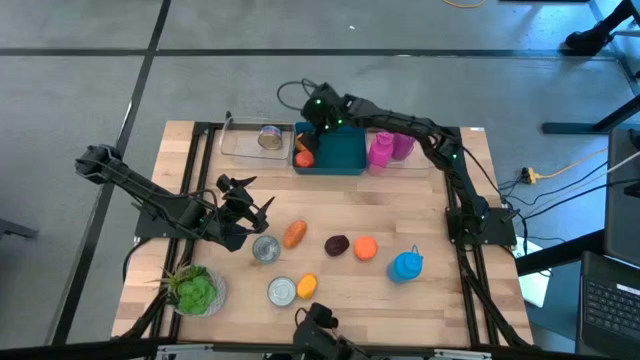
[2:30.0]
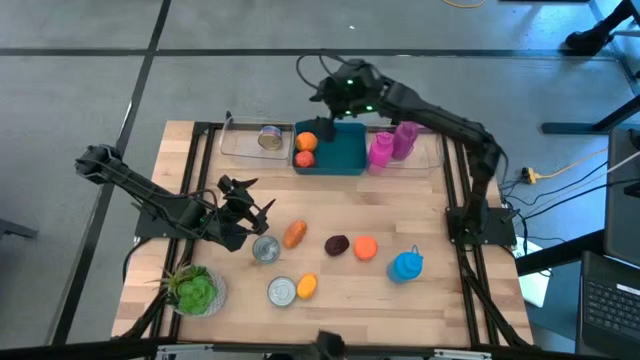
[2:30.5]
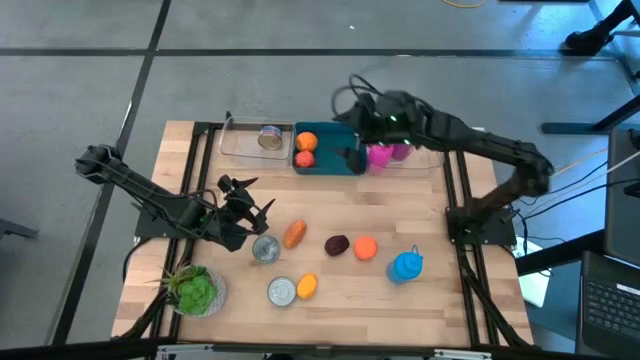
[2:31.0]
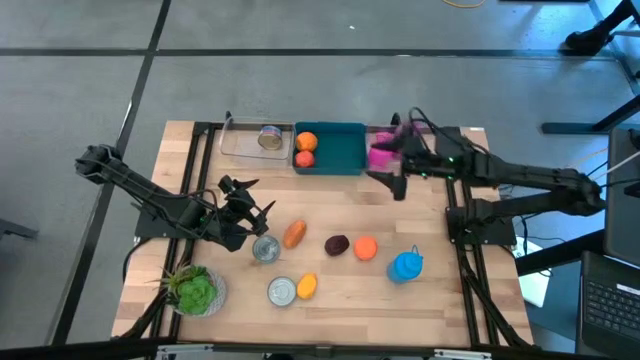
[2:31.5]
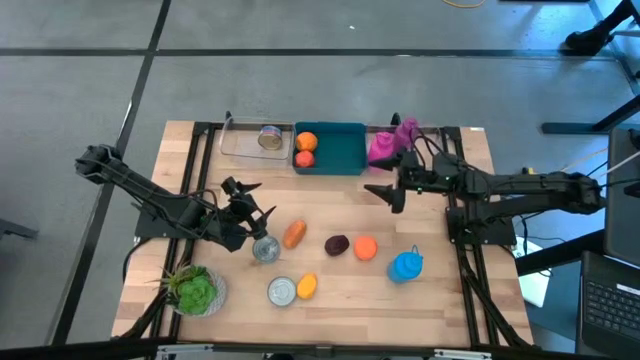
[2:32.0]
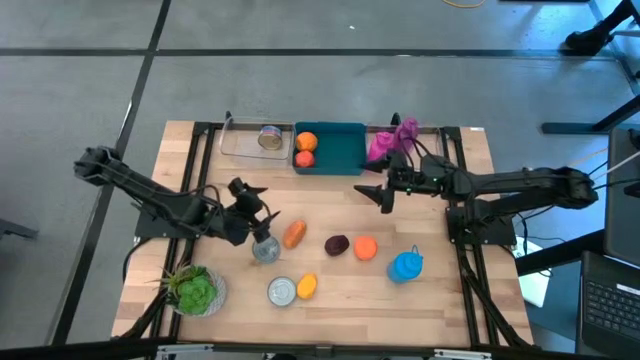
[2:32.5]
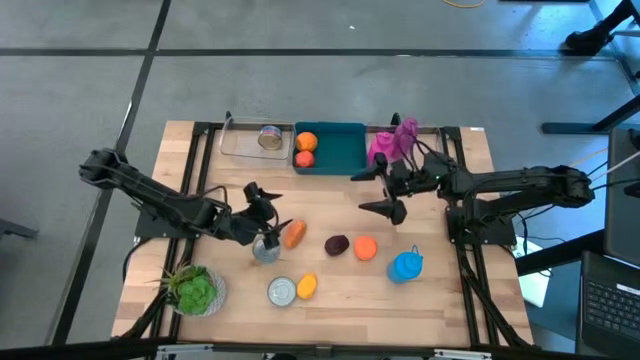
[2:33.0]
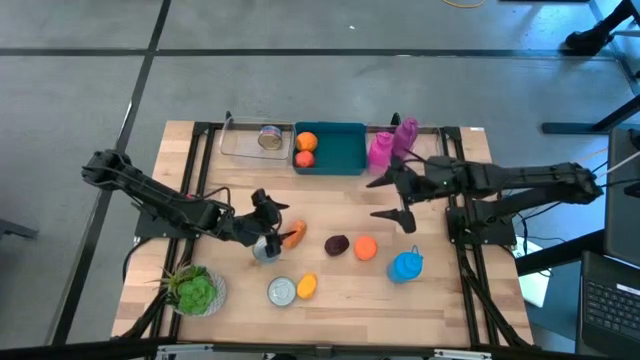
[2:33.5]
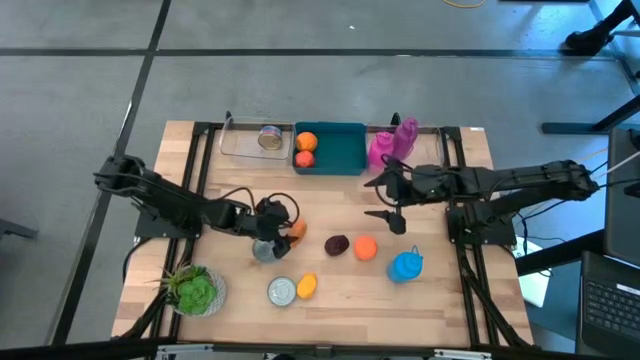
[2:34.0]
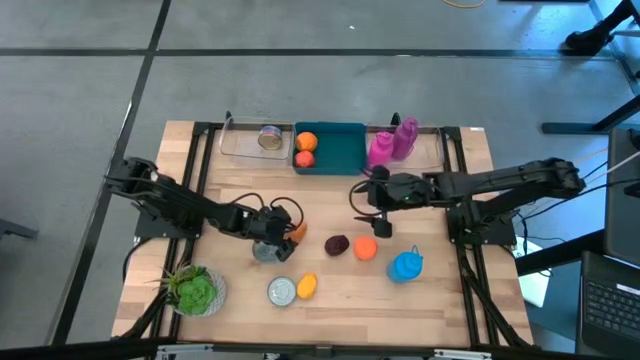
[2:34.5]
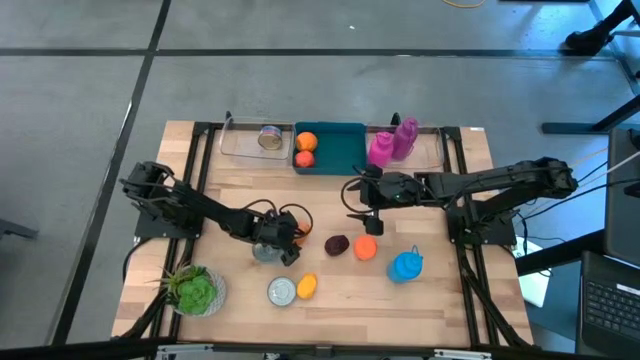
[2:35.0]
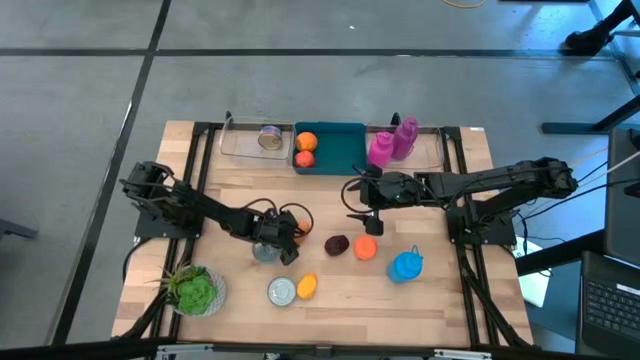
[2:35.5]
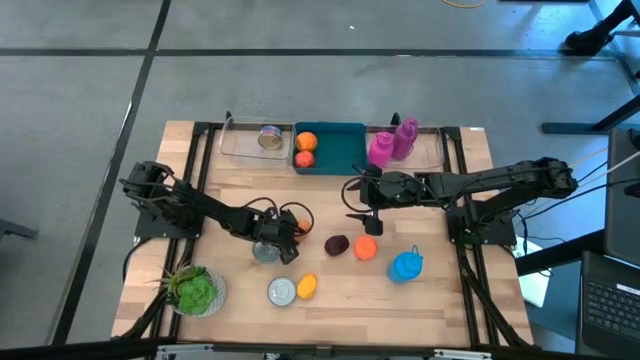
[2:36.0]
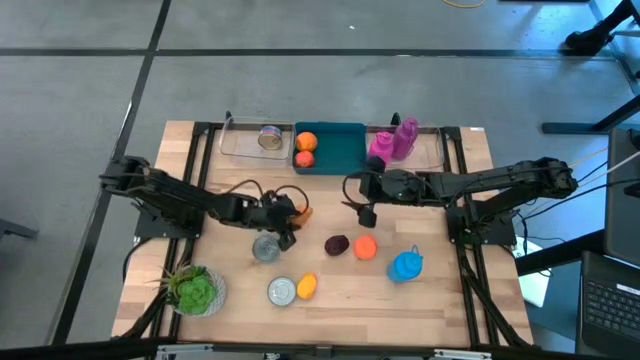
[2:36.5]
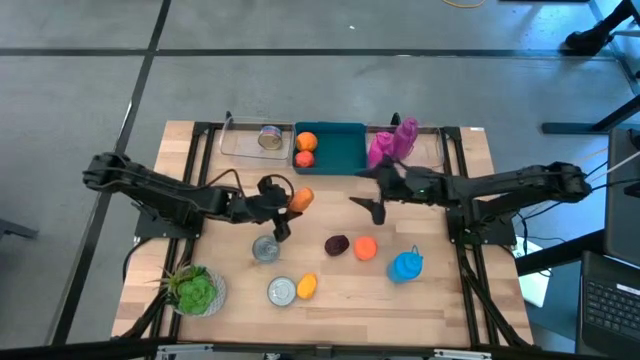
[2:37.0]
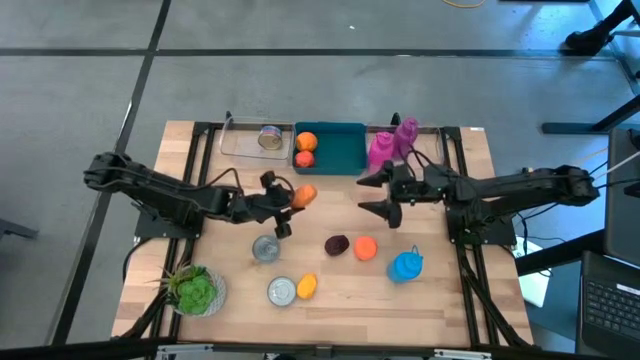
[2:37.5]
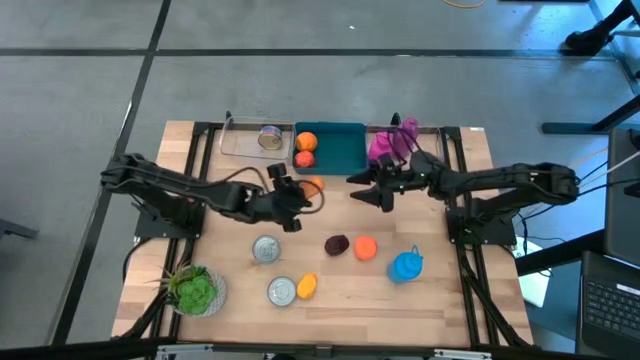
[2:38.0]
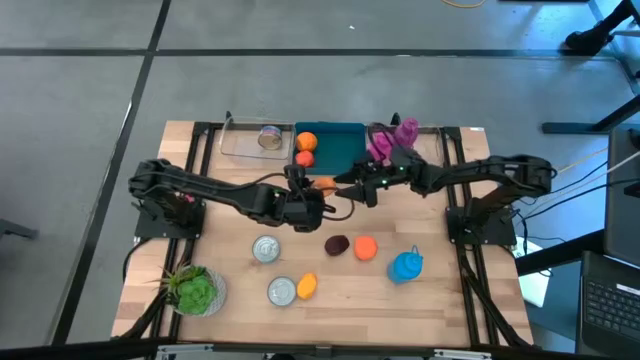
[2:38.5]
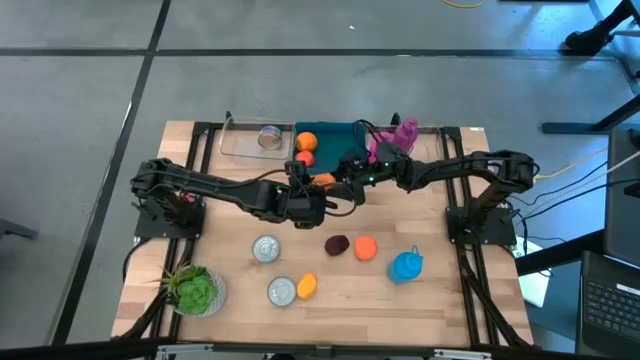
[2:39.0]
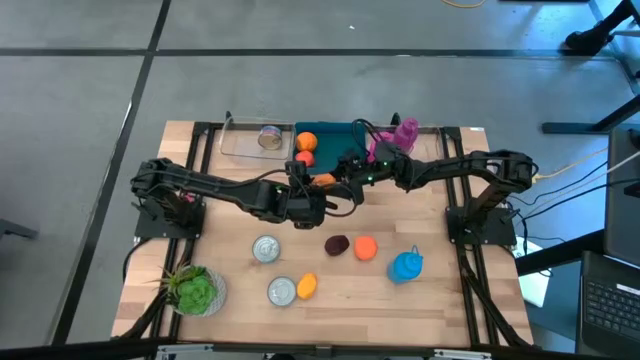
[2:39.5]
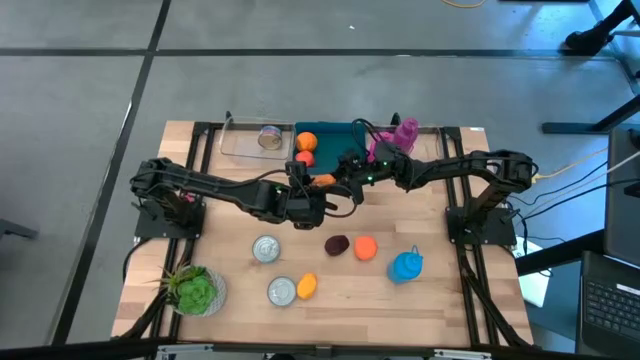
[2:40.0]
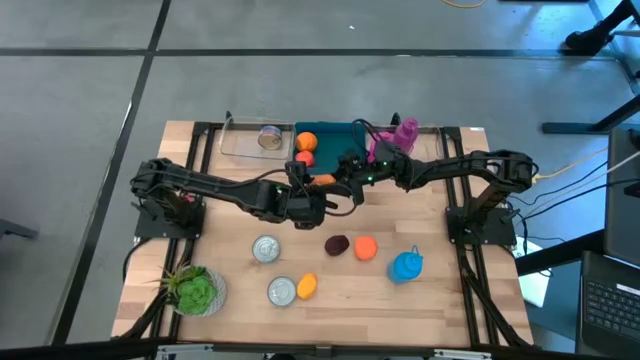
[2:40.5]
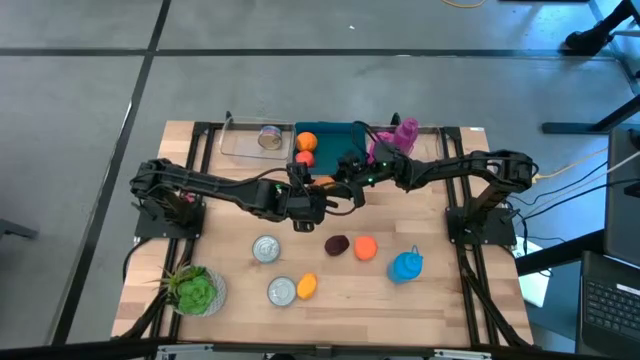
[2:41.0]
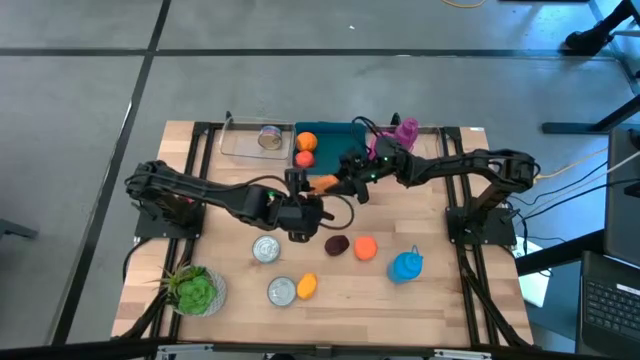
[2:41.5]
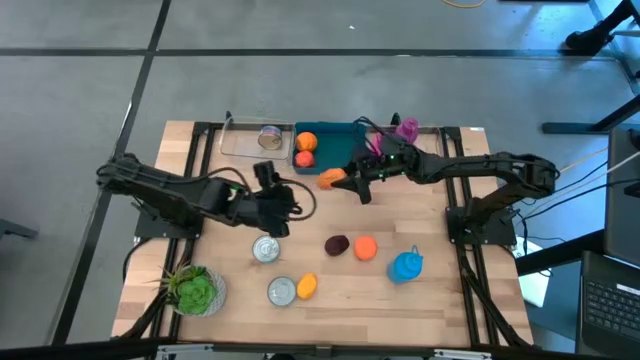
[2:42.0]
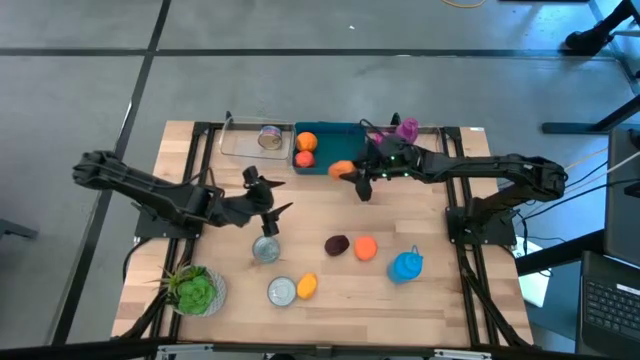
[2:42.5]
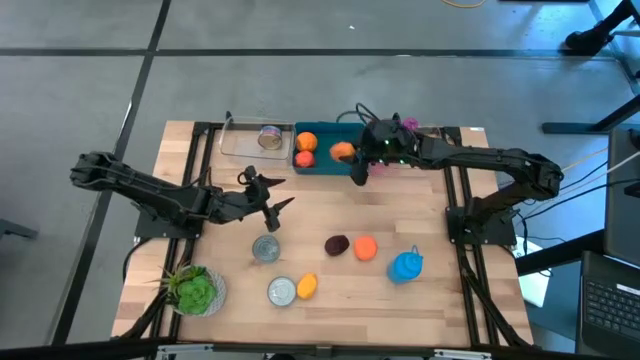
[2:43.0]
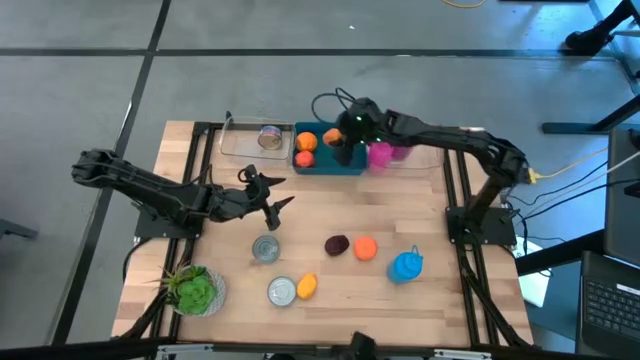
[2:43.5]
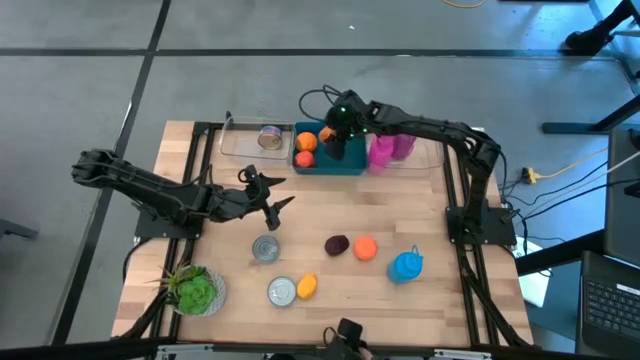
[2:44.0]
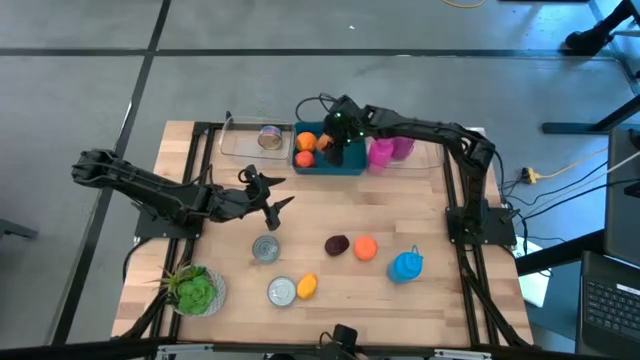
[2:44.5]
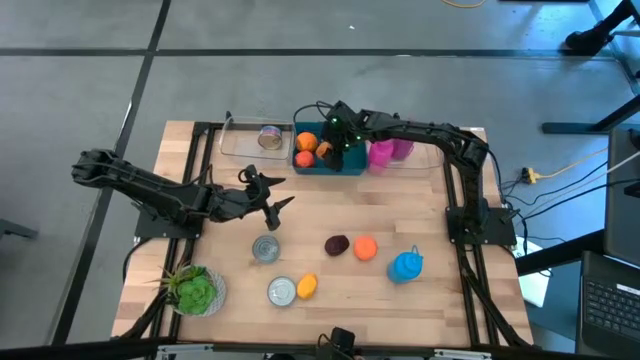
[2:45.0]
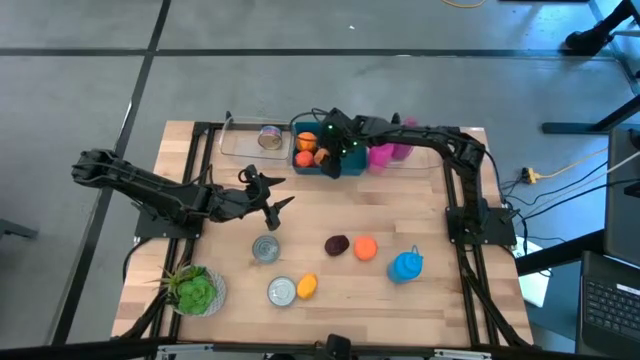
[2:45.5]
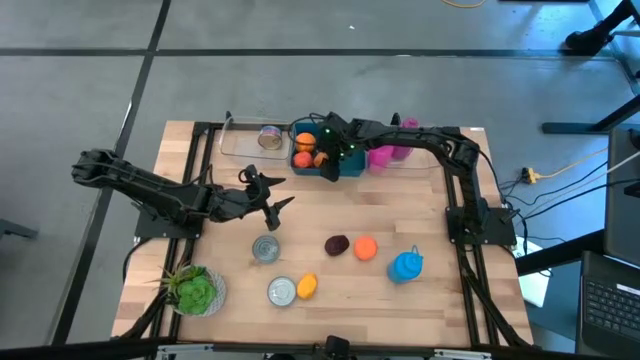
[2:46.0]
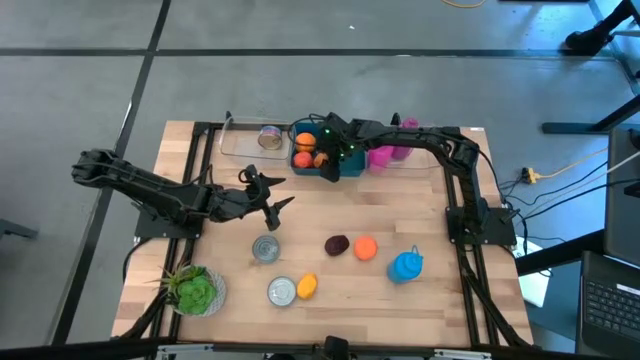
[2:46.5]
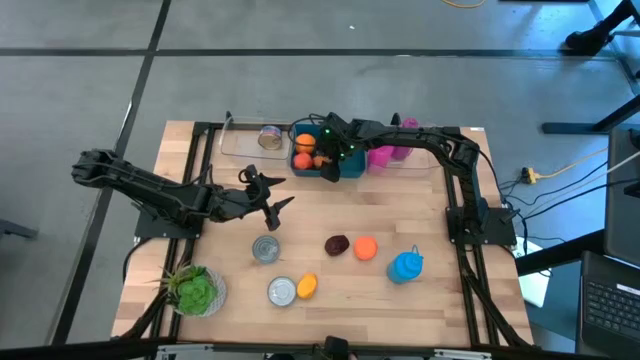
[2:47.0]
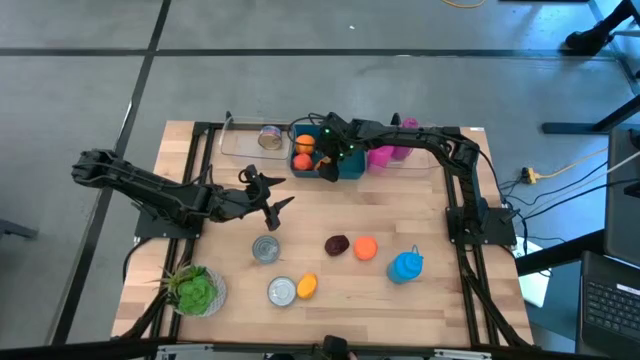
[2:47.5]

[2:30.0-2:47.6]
Task: Pick & Place Food Item
Put the mango into the blue bin

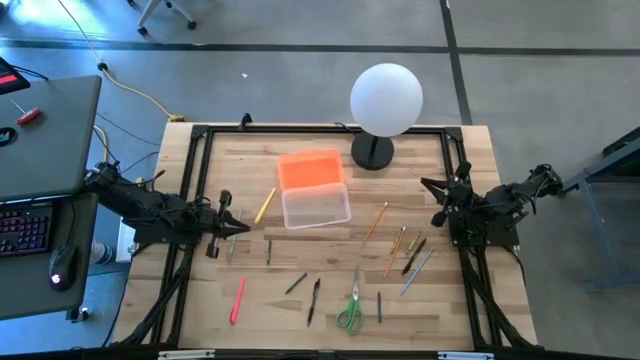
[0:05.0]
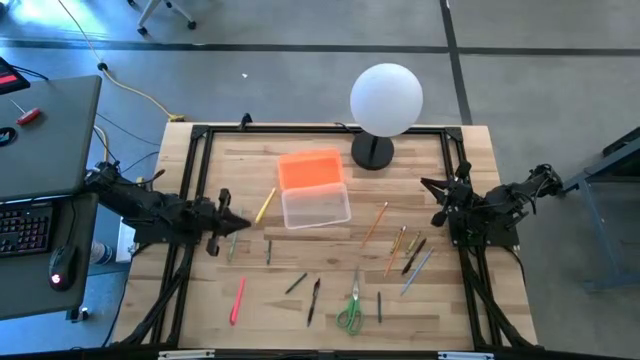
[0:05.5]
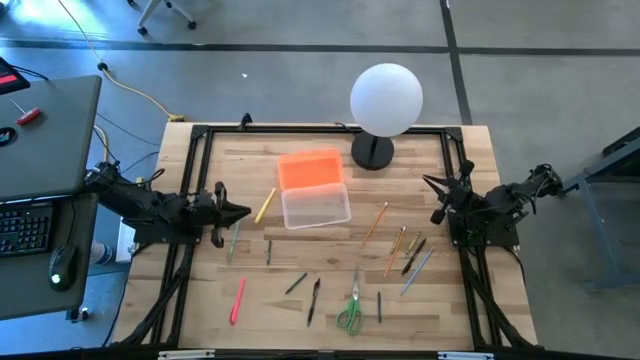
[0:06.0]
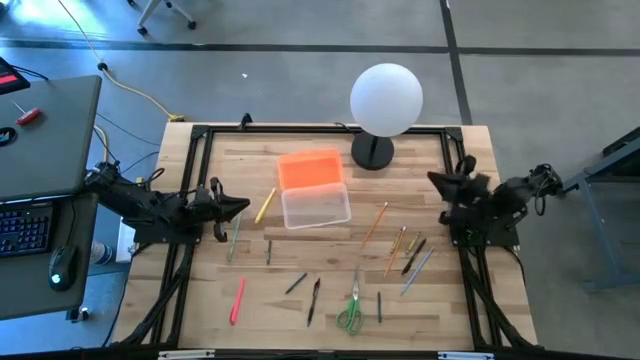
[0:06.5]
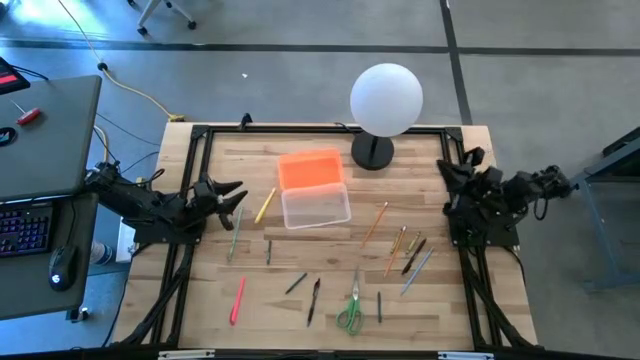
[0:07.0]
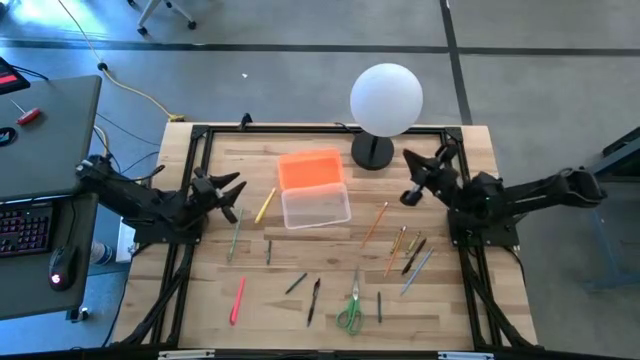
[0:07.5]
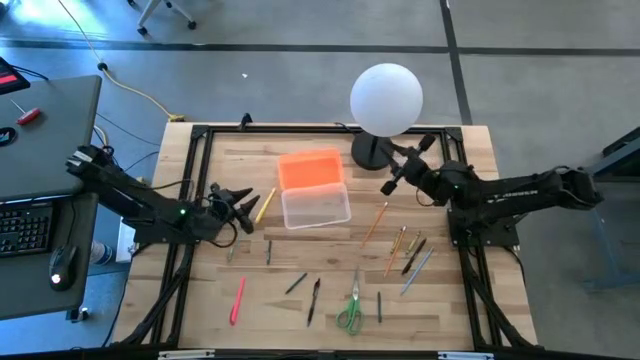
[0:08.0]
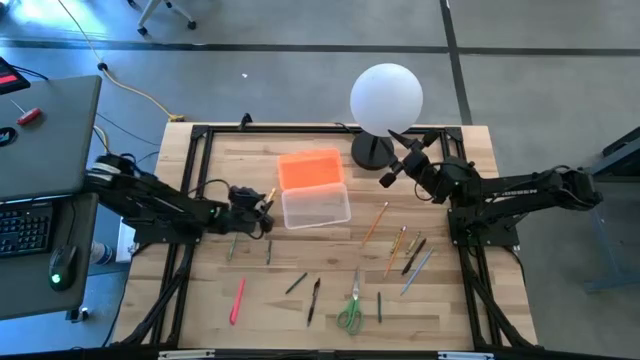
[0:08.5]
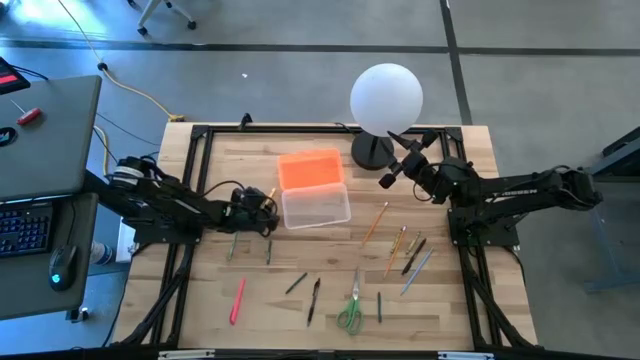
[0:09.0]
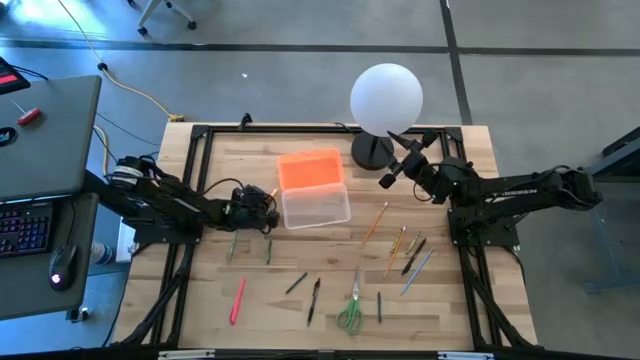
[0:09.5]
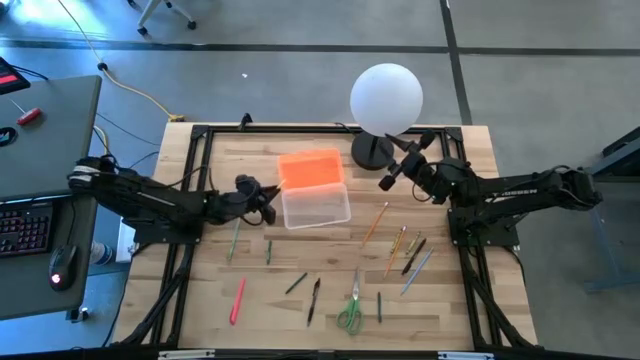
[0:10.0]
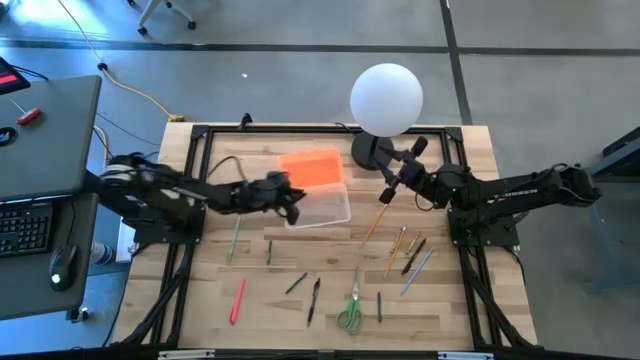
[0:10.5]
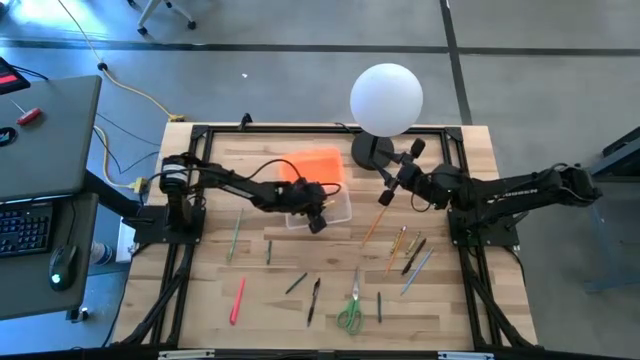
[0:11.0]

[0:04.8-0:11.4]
Task: Pick & place school supplies into a supply box
Put the yellow pen into the transparent supply box
